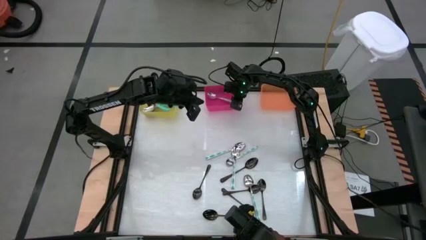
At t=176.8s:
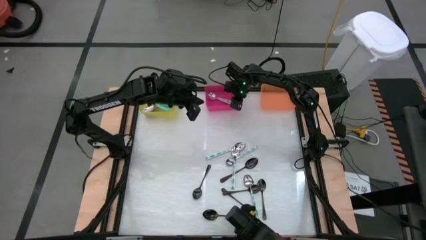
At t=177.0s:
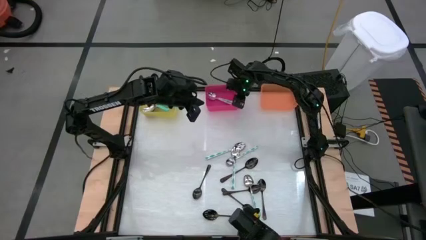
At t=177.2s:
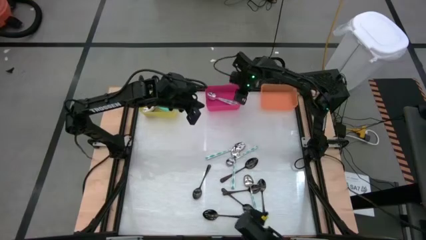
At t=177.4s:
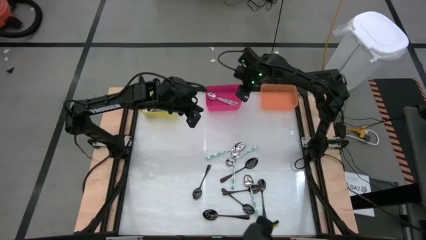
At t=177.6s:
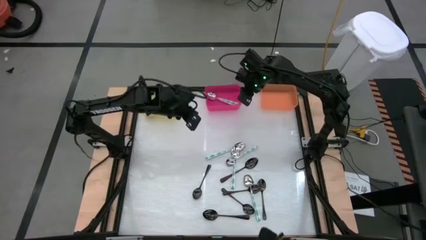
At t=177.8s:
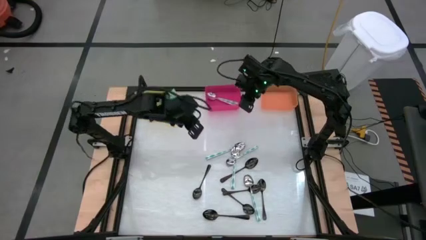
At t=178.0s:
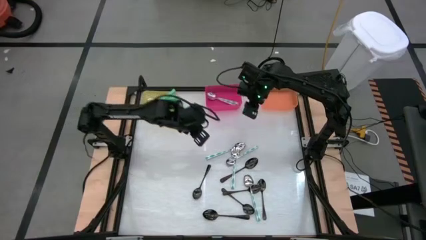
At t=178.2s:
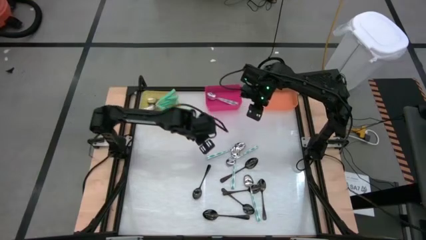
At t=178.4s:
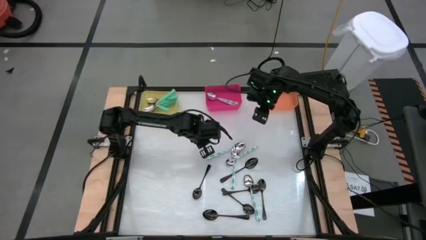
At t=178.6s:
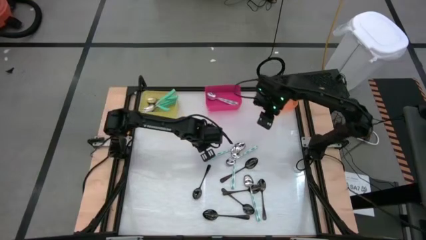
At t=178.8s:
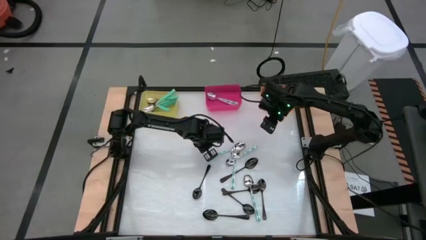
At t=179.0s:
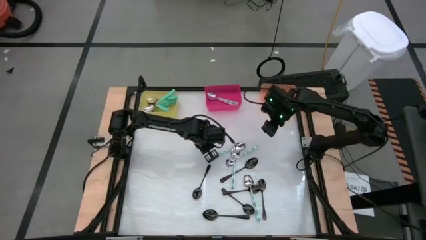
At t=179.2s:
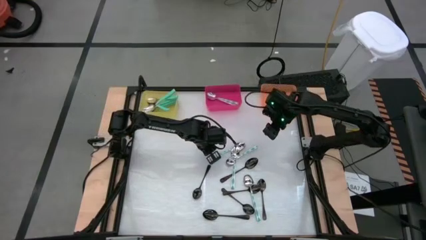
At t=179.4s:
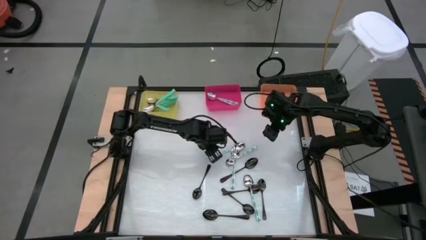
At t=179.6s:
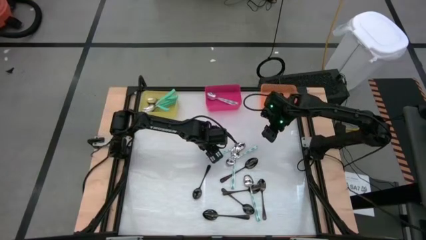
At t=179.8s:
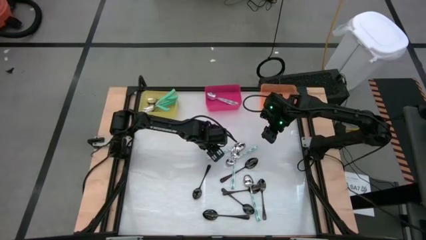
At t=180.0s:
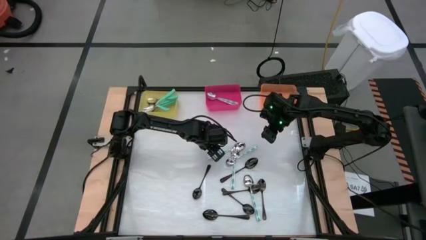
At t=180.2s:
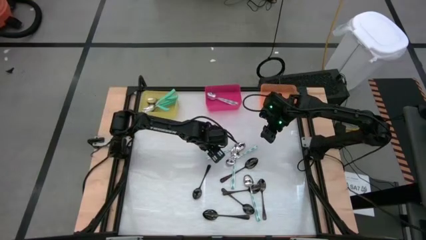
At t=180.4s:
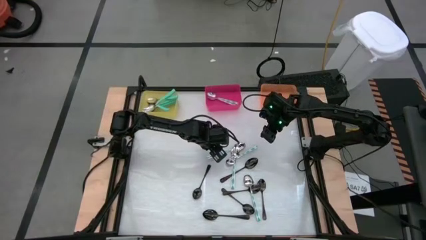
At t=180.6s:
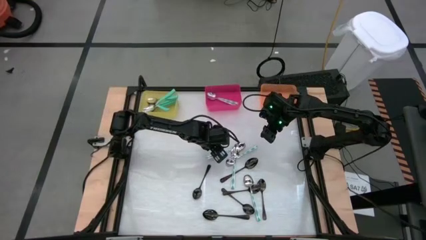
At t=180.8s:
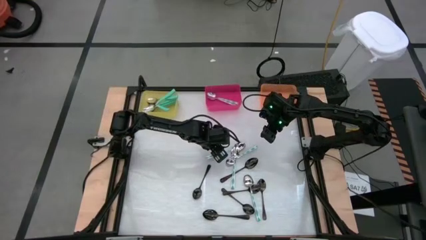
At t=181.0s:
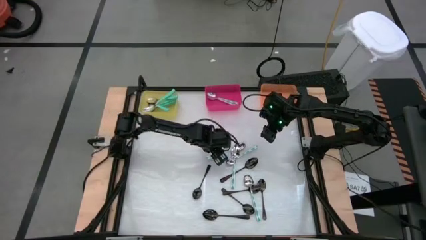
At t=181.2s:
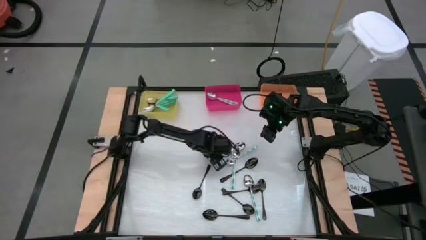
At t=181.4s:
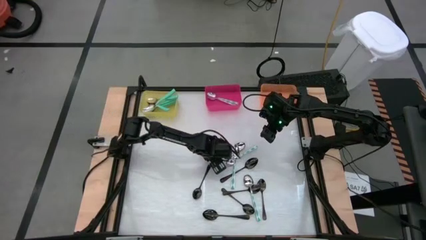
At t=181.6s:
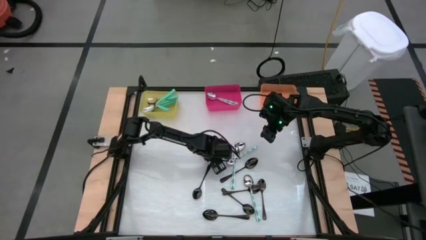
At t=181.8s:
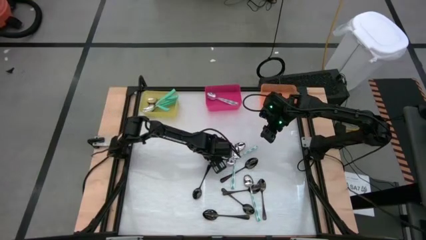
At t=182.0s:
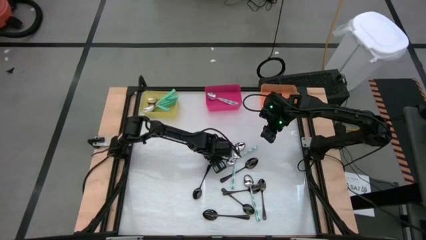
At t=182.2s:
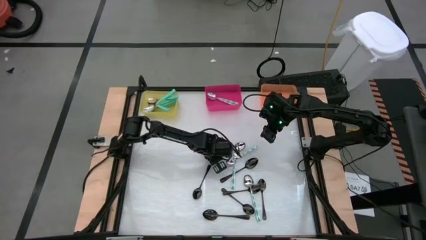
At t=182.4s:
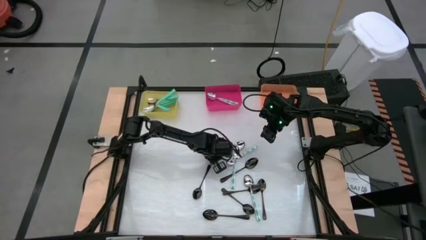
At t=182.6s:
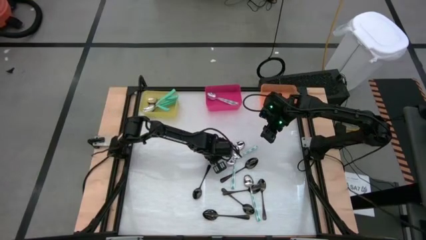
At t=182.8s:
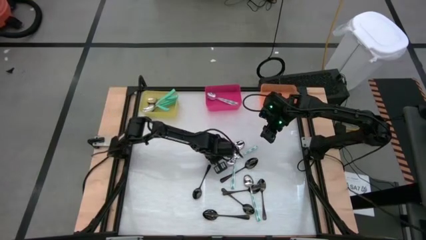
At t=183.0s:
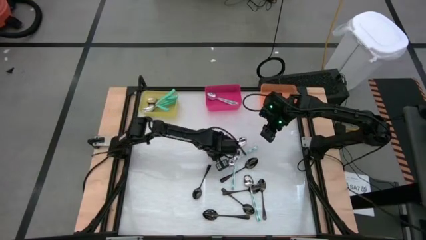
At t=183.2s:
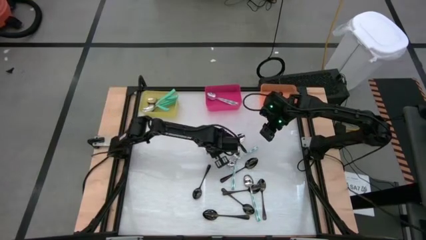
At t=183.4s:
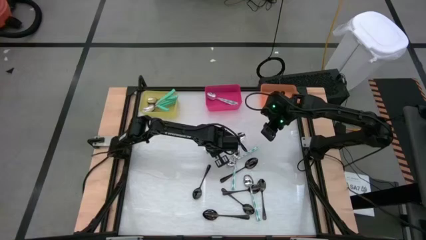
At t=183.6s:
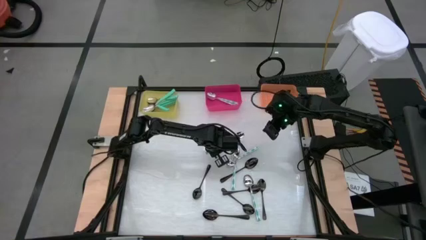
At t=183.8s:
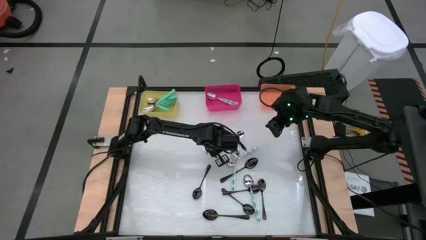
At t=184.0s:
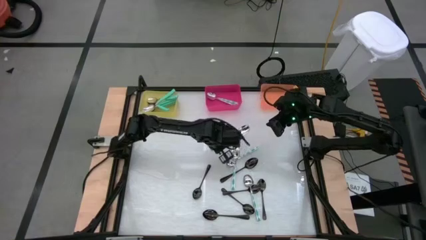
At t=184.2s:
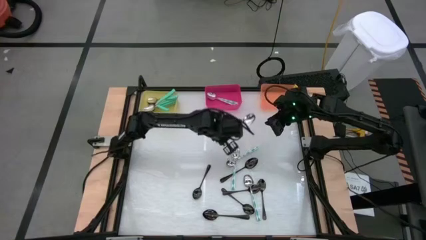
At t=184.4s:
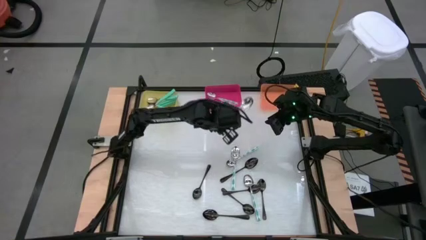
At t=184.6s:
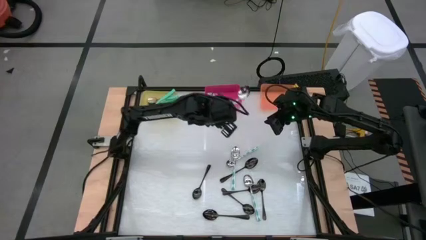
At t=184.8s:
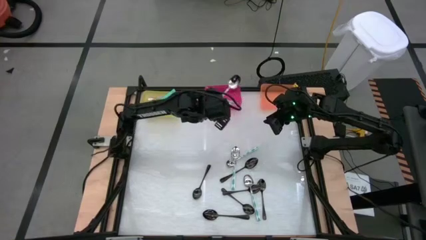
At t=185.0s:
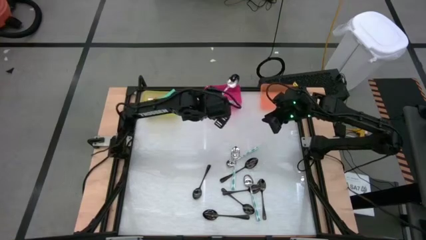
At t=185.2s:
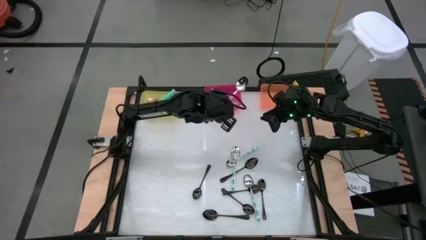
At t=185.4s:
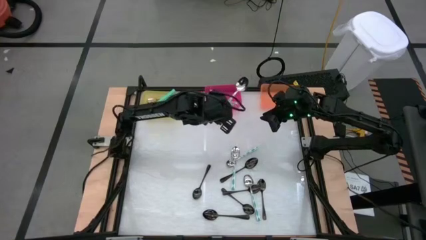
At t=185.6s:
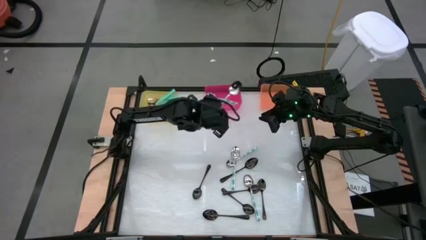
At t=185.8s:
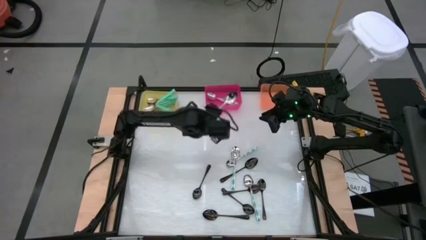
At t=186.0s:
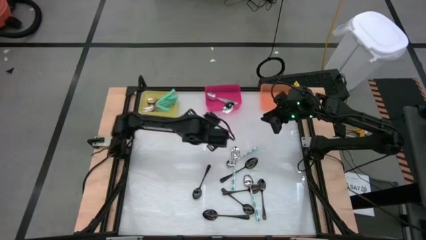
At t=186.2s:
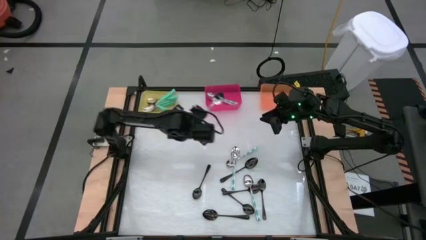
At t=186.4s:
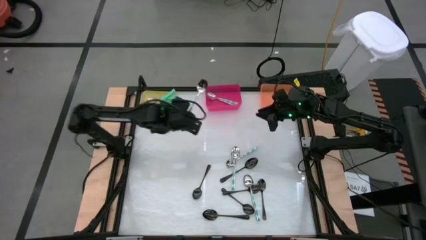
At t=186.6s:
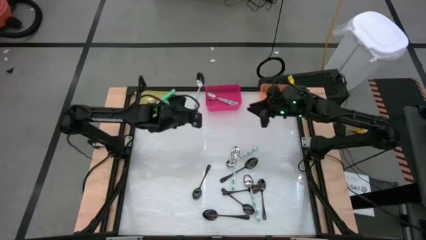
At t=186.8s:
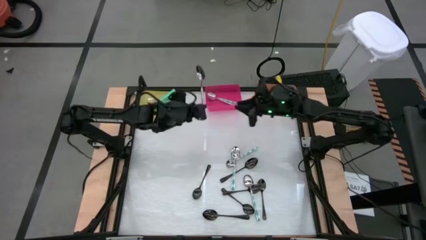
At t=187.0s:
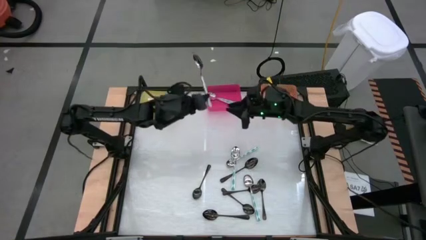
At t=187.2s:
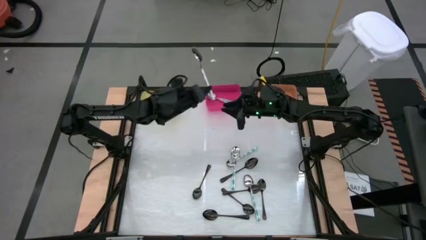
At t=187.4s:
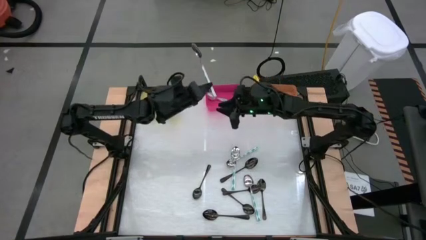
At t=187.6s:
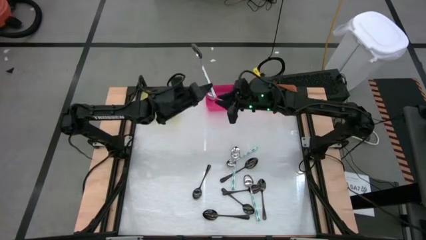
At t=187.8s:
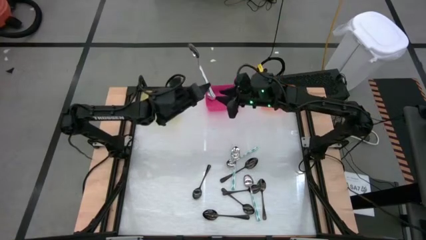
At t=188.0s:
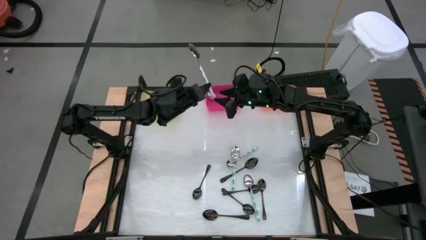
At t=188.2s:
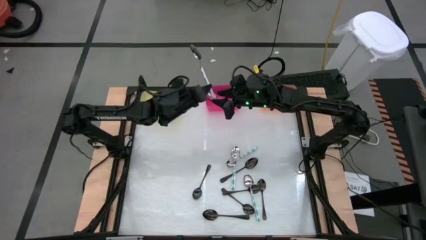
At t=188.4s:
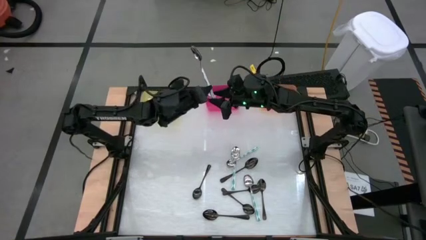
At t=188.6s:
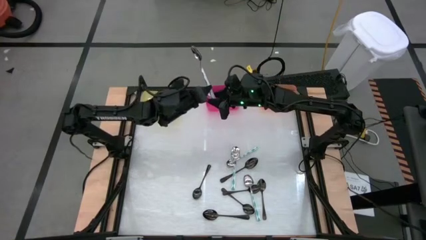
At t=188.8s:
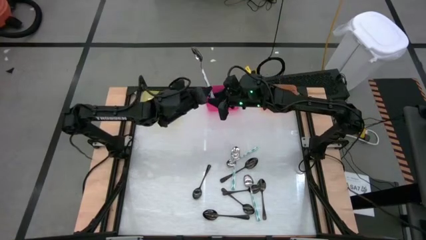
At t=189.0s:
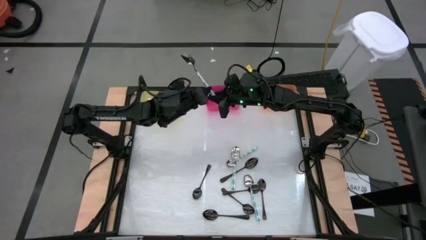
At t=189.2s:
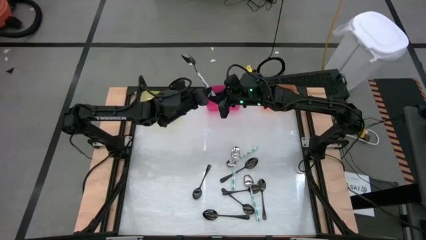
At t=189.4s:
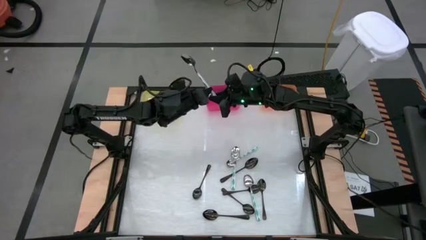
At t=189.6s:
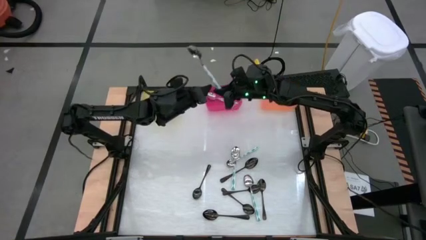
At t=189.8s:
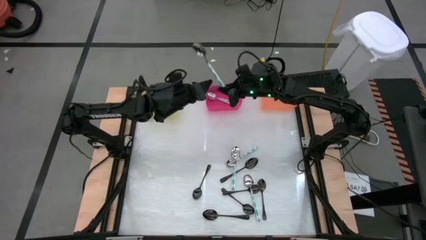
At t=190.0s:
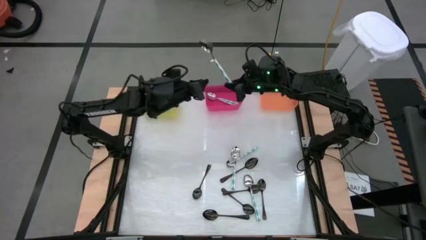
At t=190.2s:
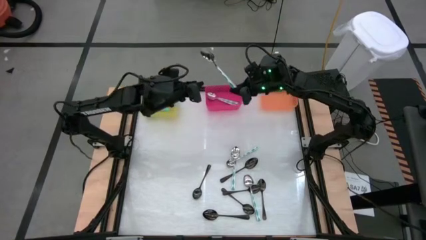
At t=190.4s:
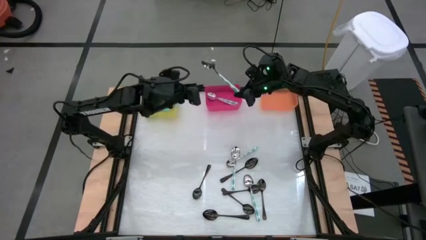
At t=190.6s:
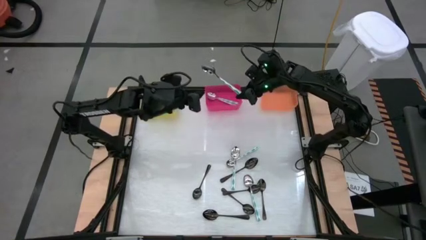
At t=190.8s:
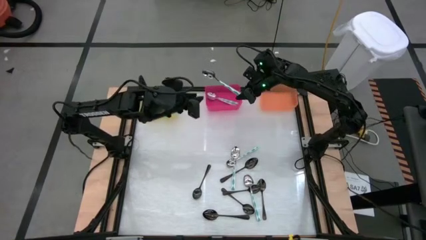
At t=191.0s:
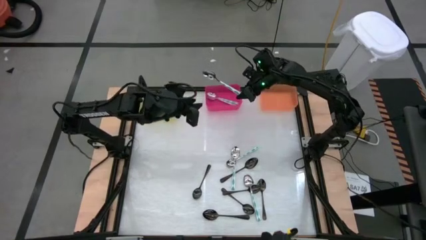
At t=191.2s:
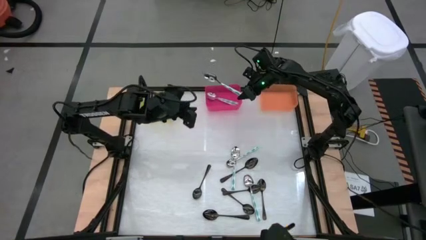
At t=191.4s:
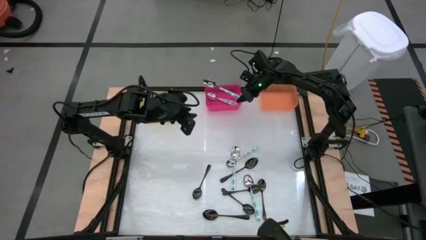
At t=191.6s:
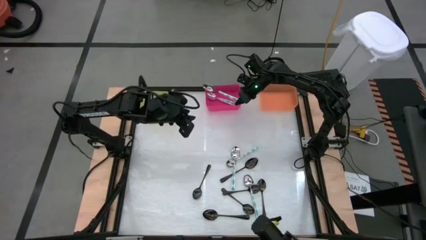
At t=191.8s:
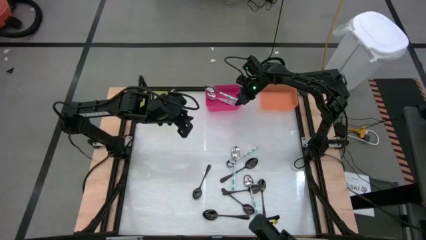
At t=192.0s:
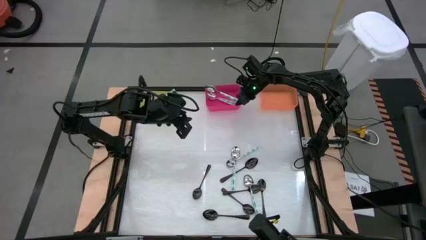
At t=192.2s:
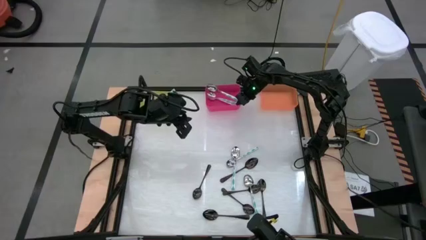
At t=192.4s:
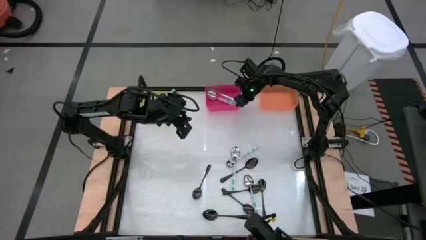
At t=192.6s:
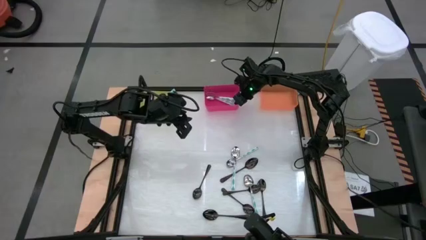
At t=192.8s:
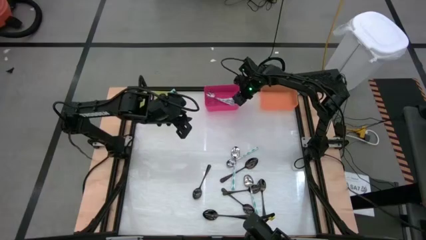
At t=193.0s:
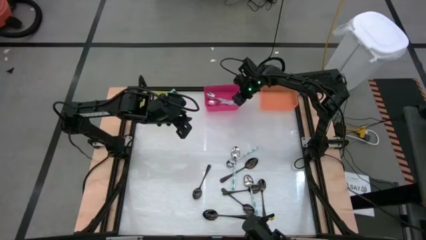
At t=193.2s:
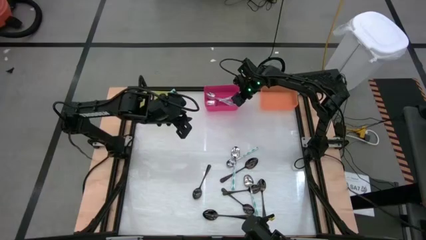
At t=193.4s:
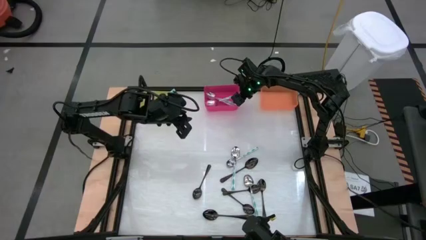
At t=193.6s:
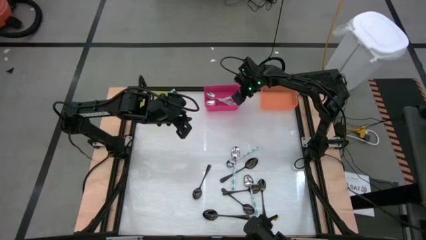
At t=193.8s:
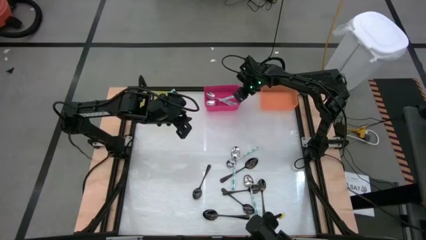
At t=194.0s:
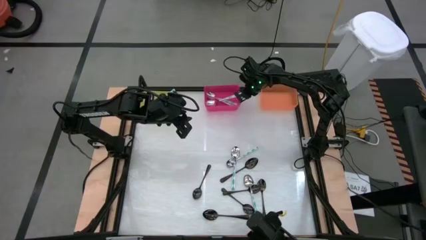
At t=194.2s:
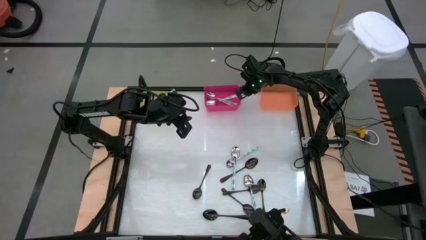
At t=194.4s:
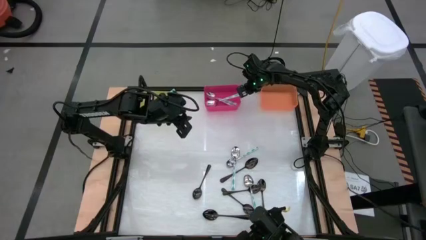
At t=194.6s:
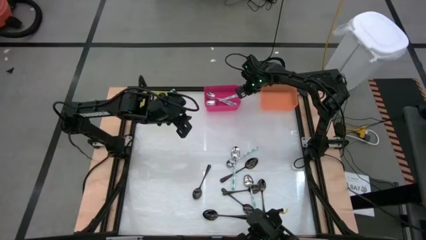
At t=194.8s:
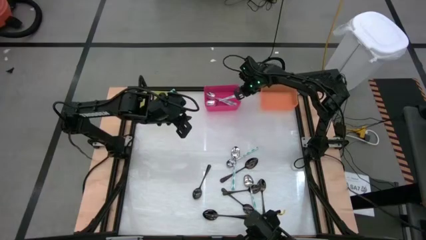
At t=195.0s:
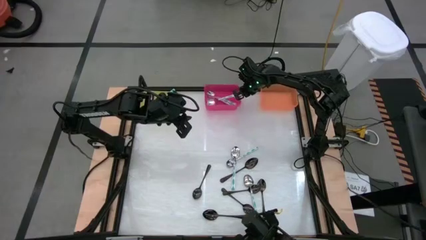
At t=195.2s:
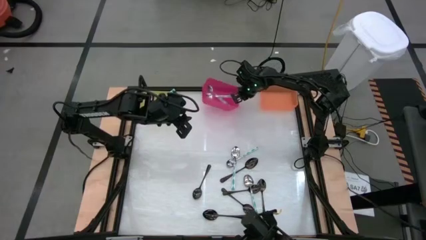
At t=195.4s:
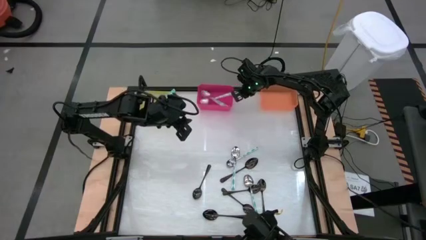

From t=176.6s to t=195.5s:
Task: Sort silverware by color (type)
Put the white patterned spoon into the pink bin
